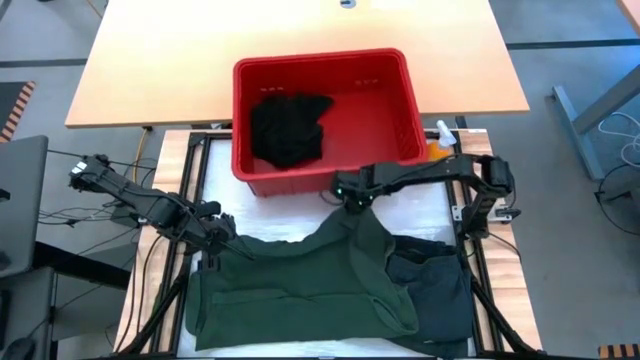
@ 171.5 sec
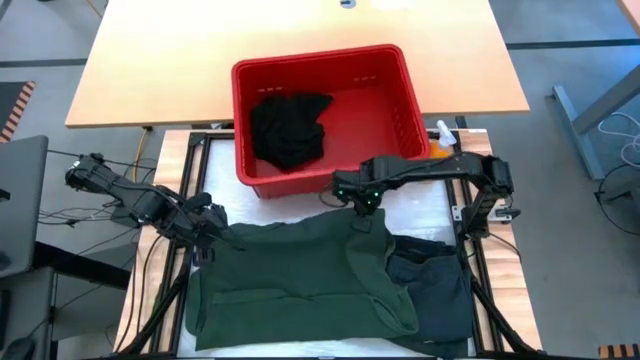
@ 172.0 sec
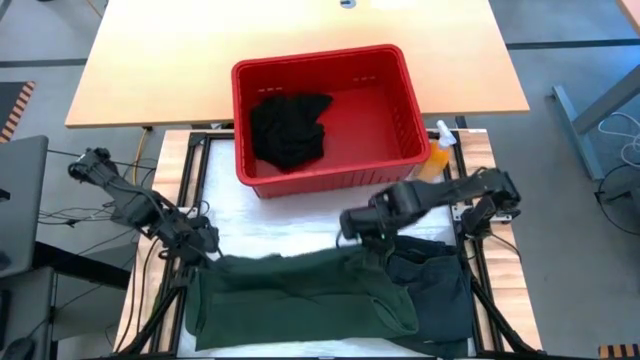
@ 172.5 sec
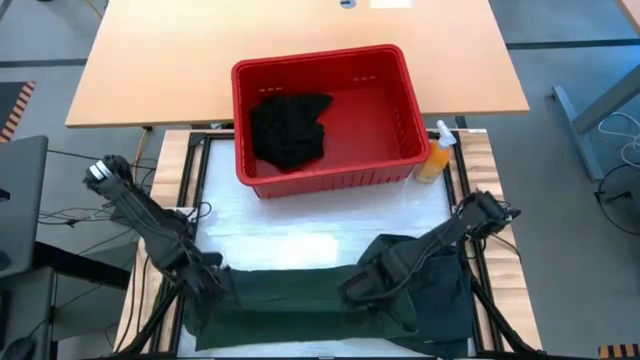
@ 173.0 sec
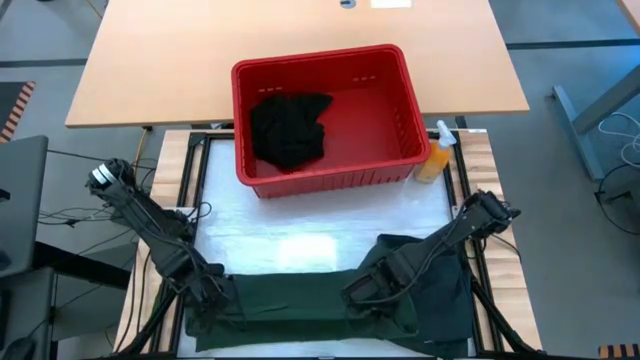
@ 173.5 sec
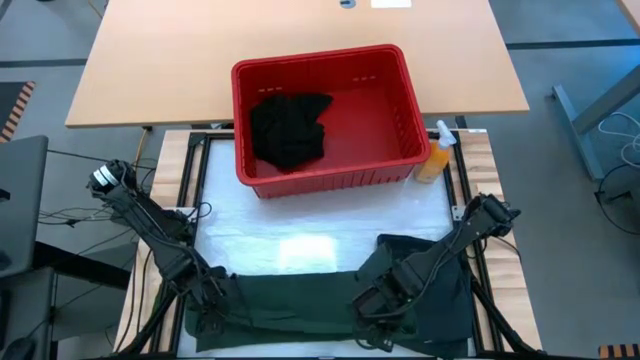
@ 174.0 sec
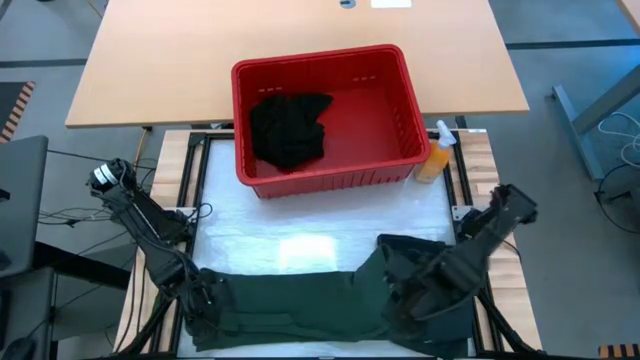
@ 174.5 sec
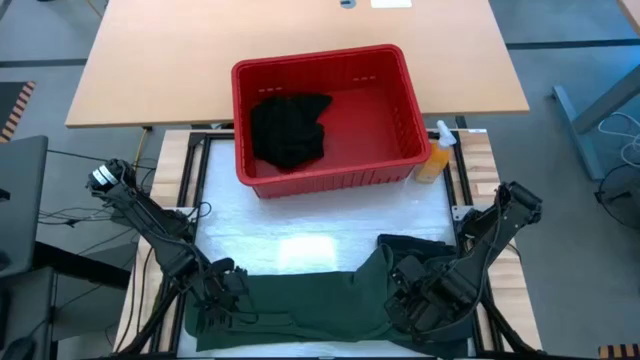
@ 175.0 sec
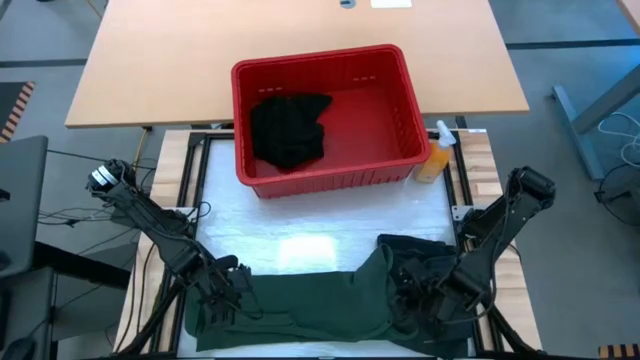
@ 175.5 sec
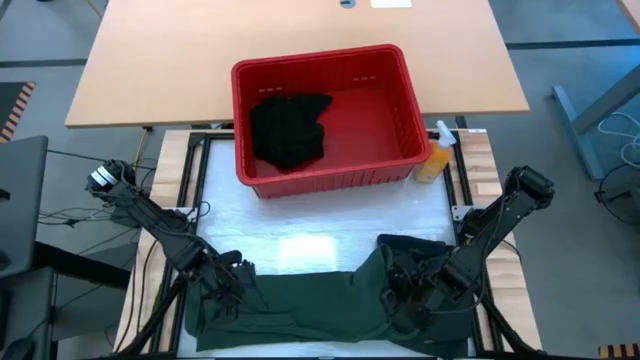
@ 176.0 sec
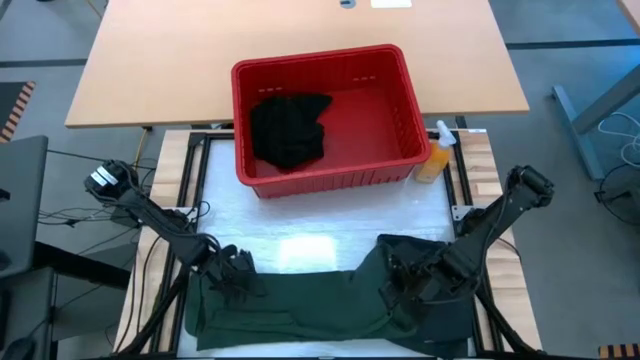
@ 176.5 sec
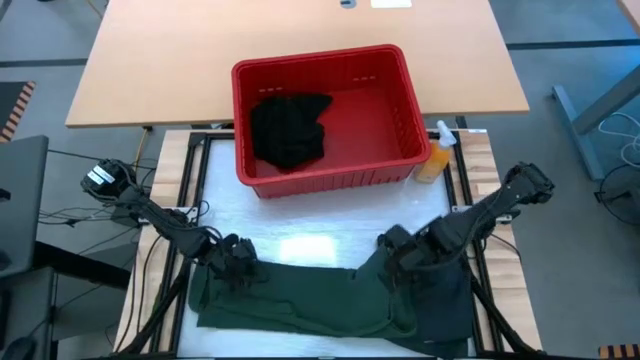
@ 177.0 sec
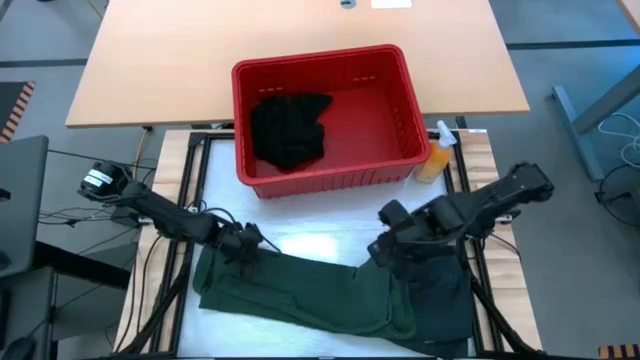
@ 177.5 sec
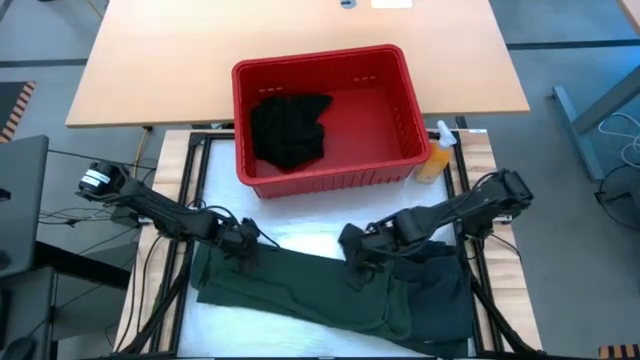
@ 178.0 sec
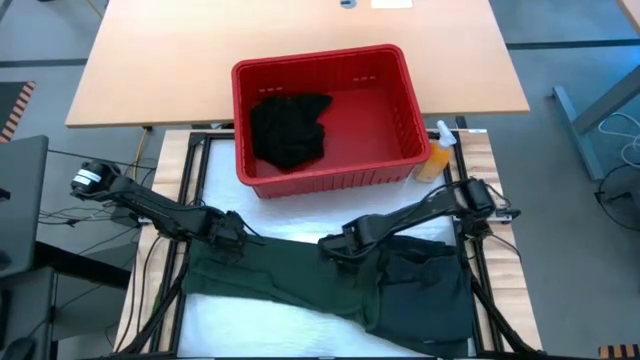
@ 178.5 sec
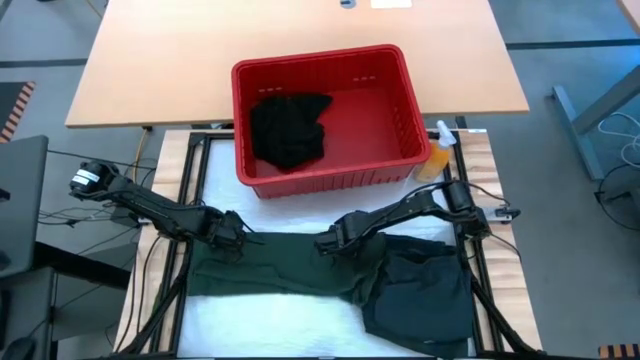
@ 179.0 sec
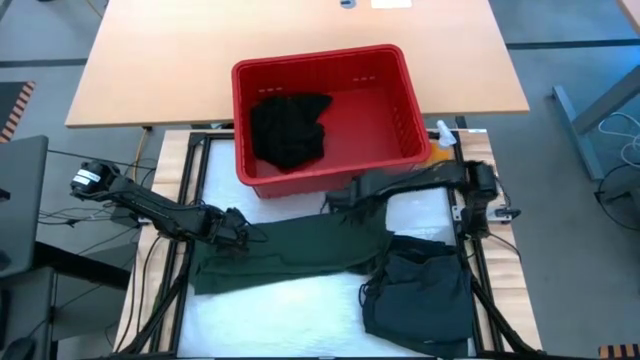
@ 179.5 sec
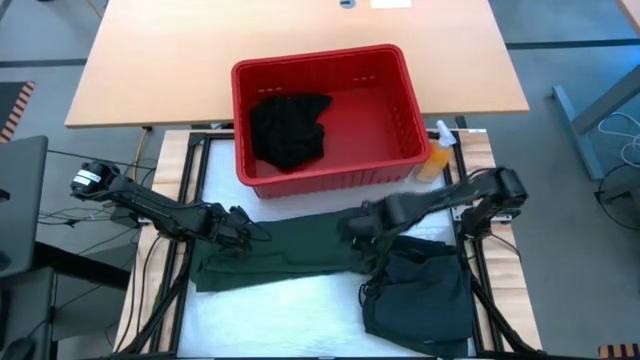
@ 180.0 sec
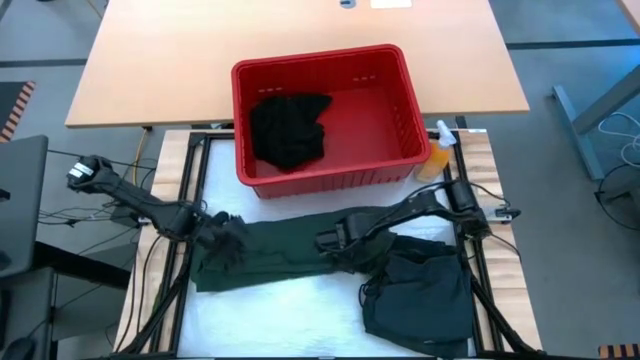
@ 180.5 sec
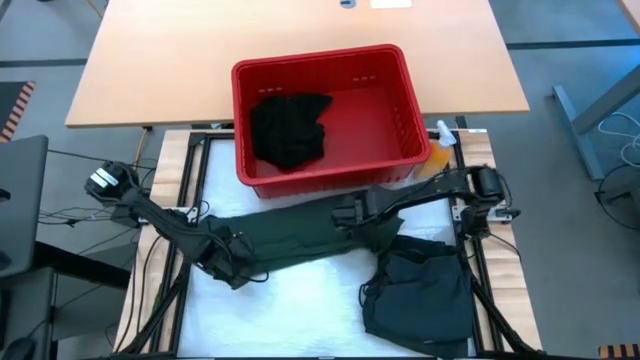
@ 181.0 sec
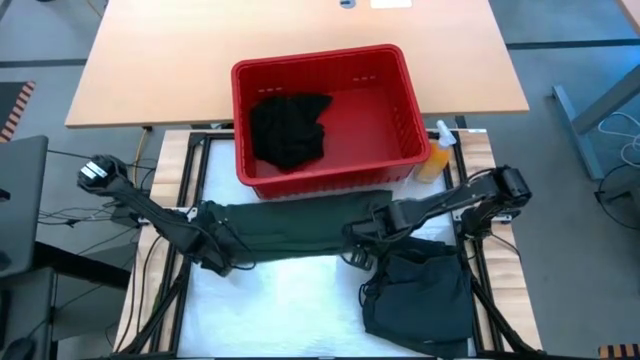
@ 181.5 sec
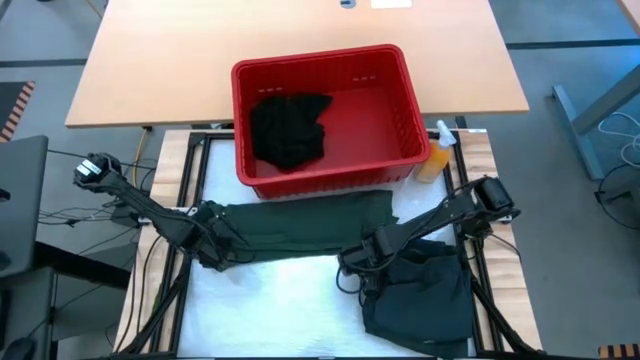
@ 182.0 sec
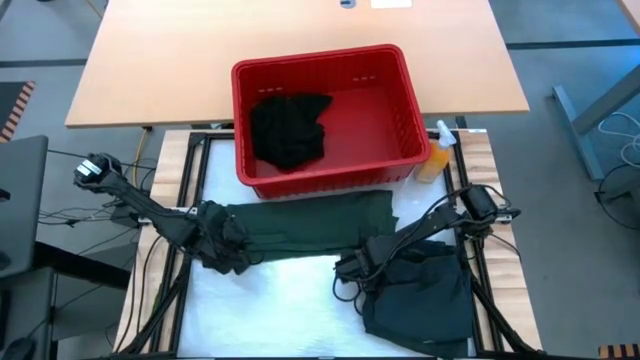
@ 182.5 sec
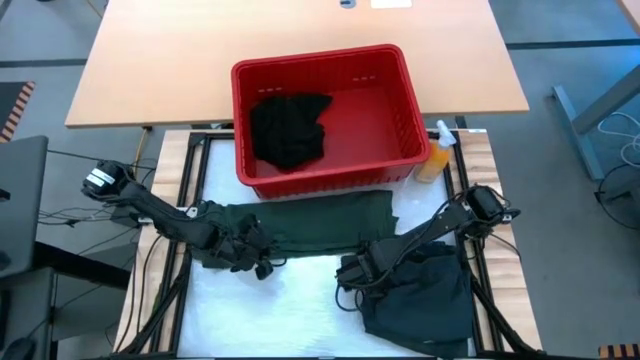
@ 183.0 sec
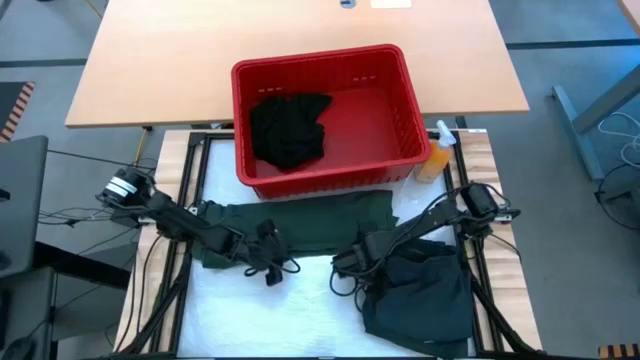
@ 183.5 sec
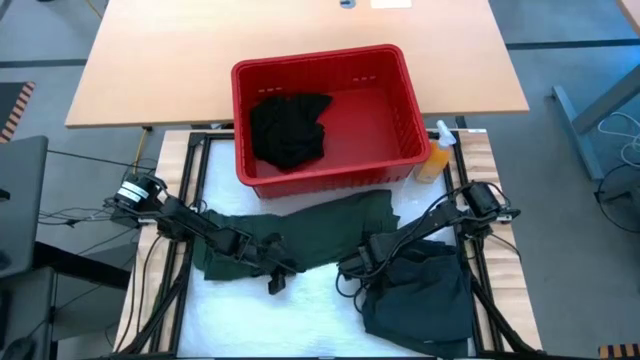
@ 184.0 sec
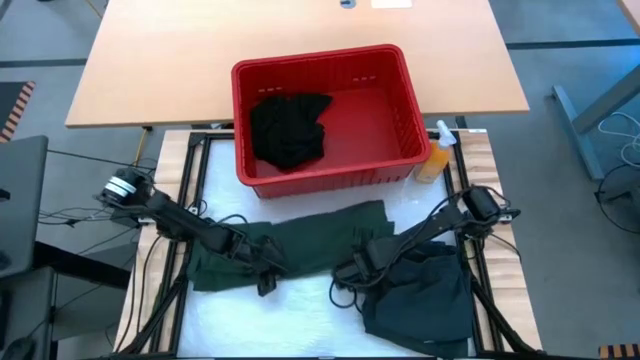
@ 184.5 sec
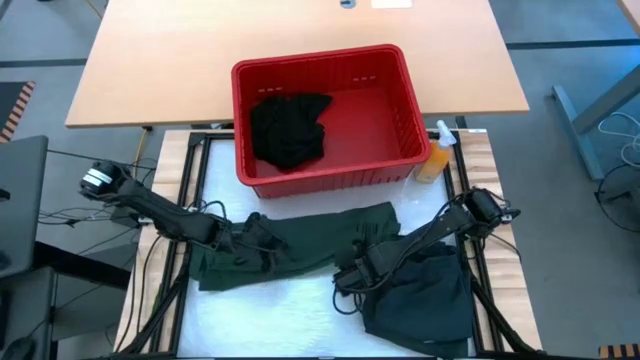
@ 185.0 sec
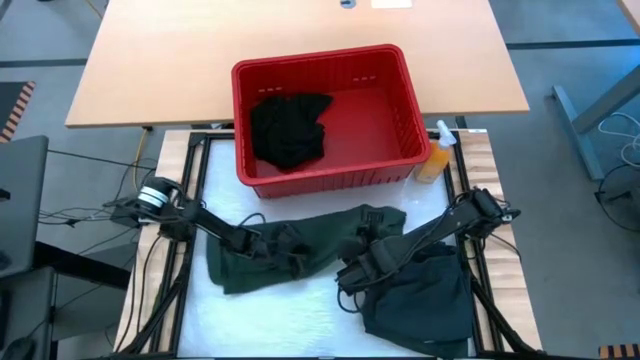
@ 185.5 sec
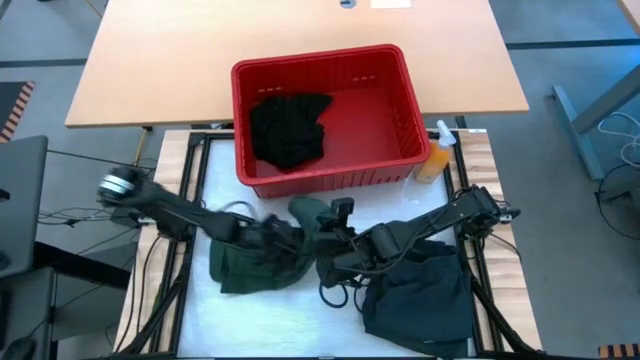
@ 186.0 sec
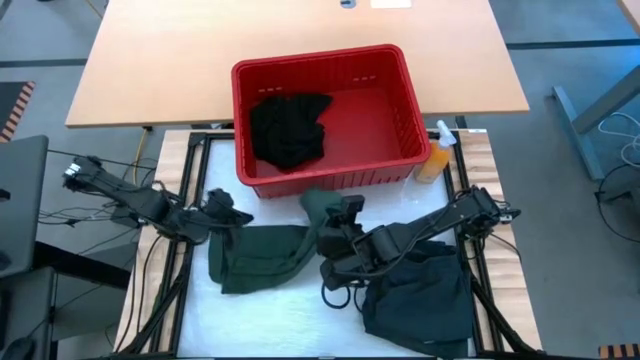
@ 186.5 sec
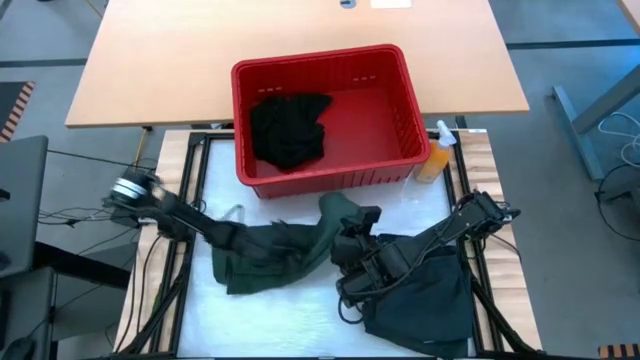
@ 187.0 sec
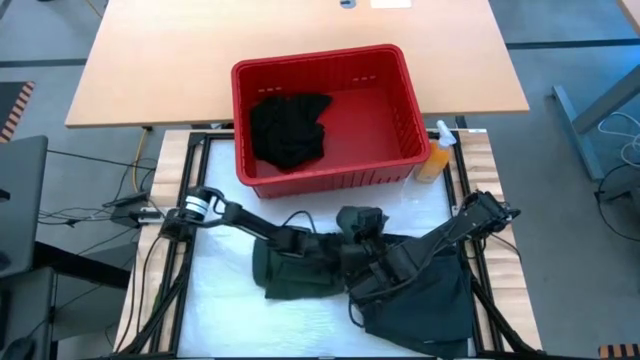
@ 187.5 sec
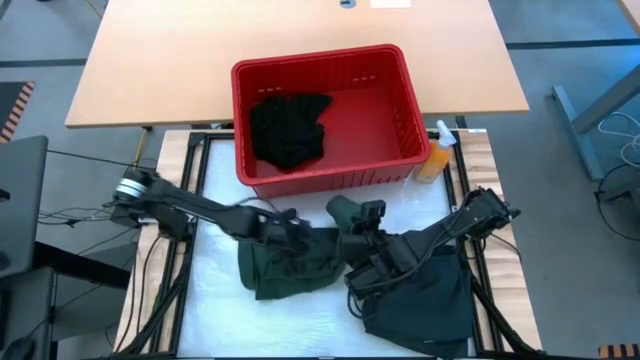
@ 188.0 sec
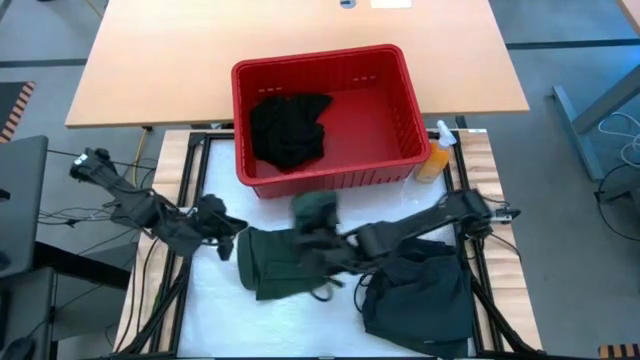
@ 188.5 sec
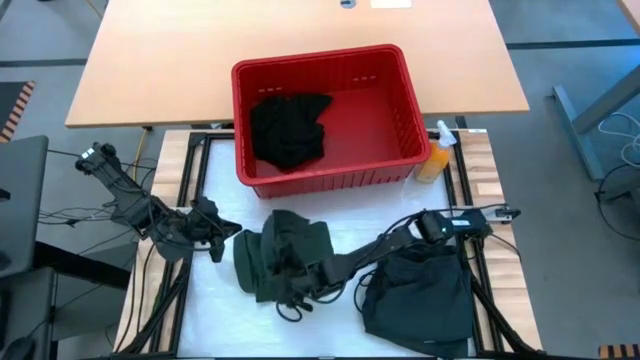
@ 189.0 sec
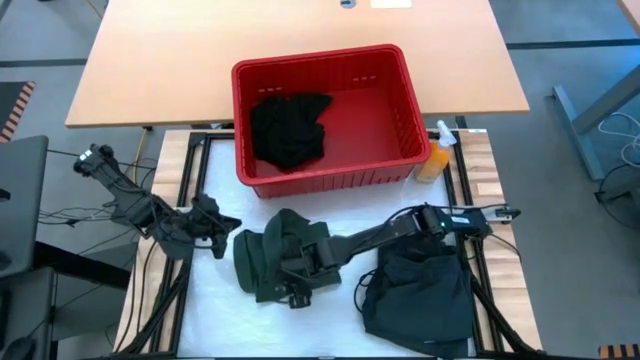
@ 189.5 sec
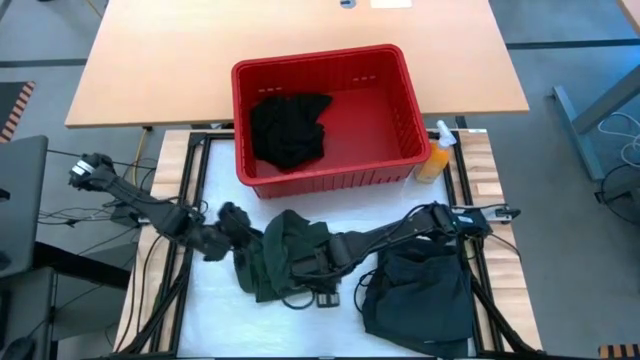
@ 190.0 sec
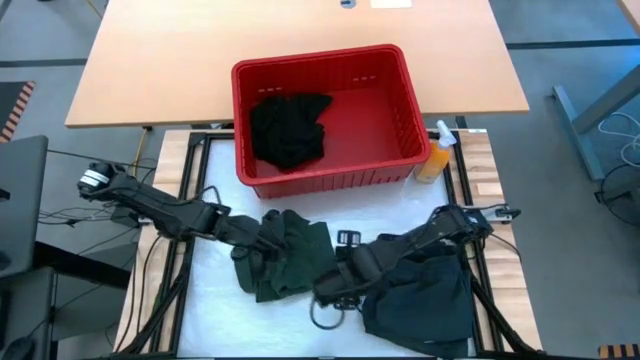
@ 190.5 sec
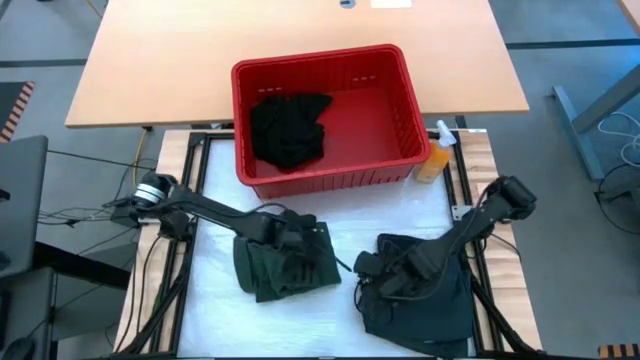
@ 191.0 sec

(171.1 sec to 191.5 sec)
Task: Fold laundry
Fold the green shirt
